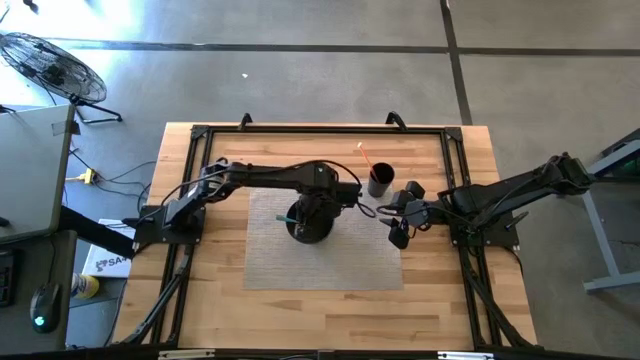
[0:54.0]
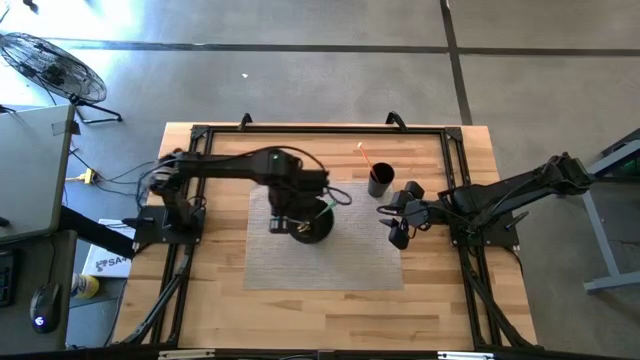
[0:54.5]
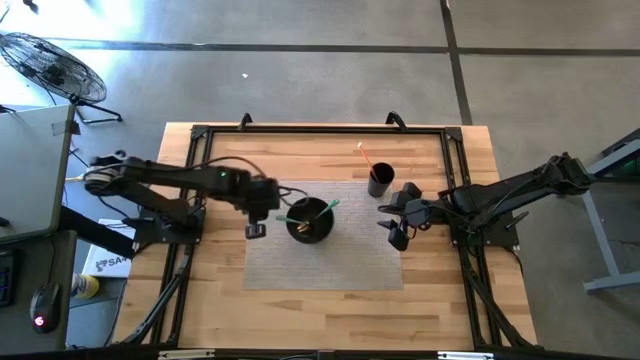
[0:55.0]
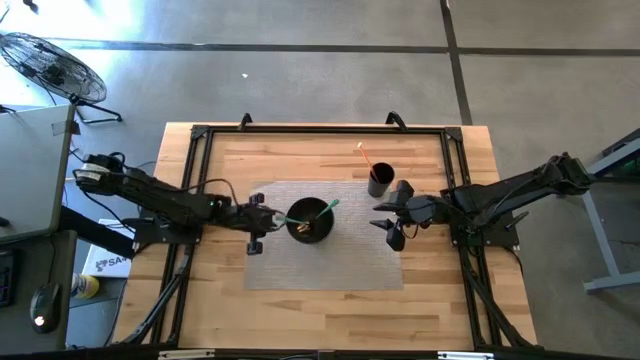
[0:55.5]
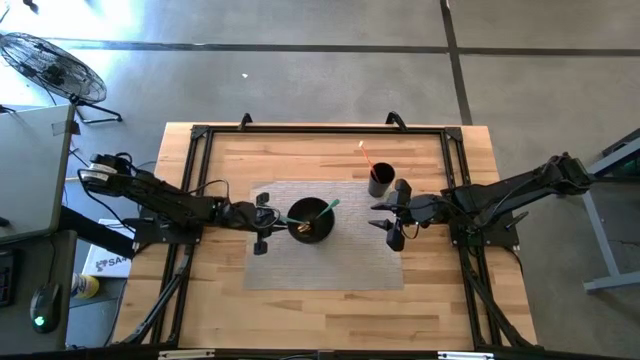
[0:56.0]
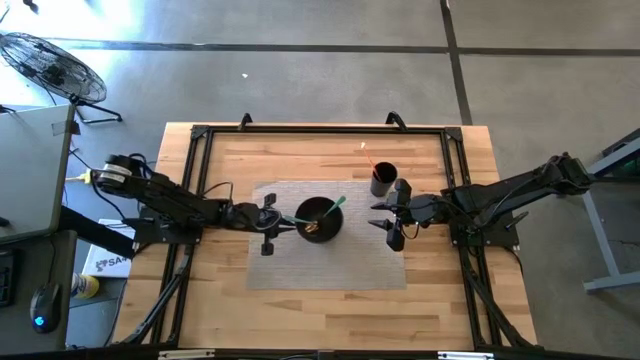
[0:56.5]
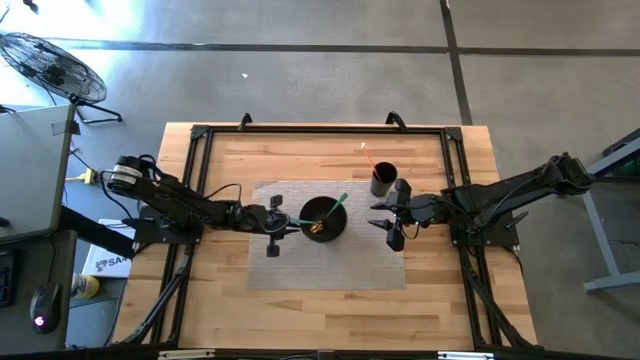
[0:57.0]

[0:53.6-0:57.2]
Task: Pick & Place Utensil
Adjust the black bowl on the gray mat

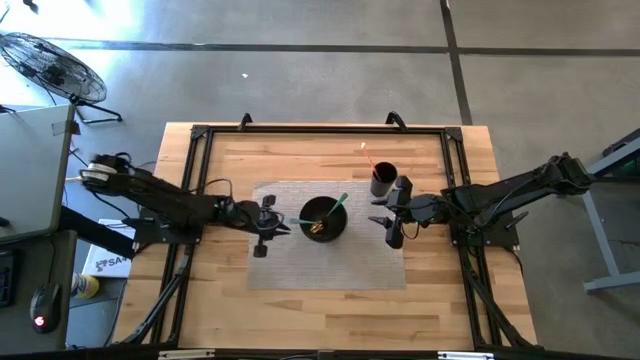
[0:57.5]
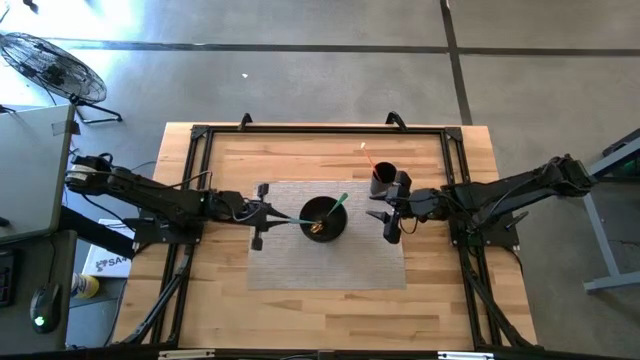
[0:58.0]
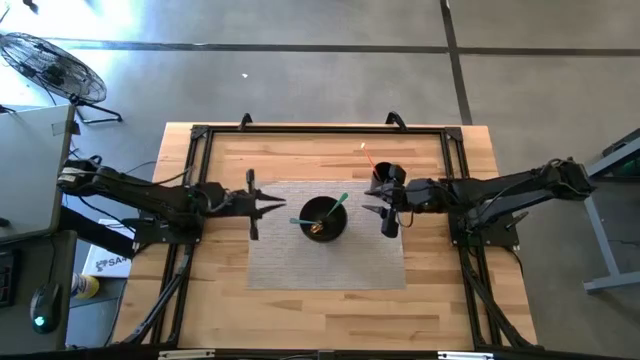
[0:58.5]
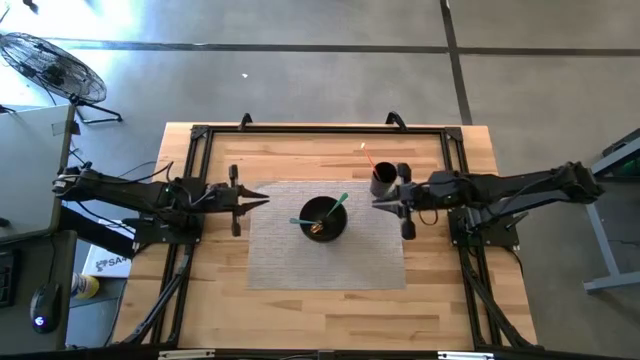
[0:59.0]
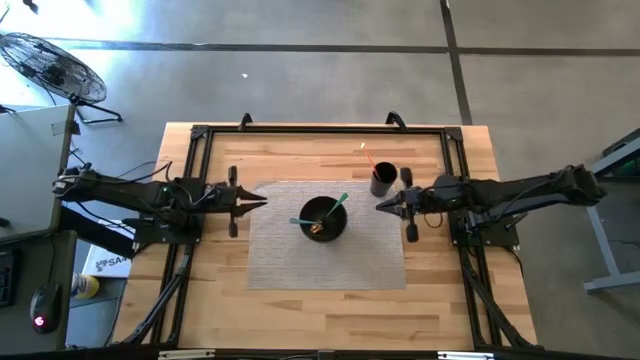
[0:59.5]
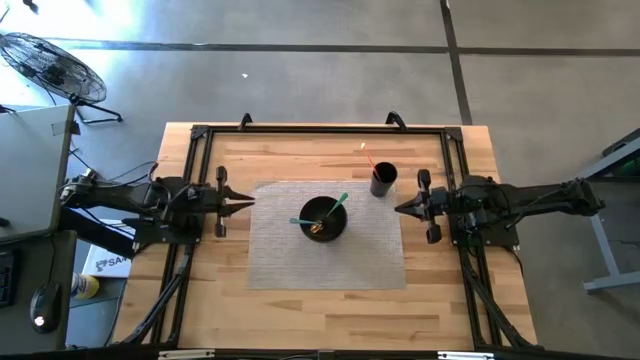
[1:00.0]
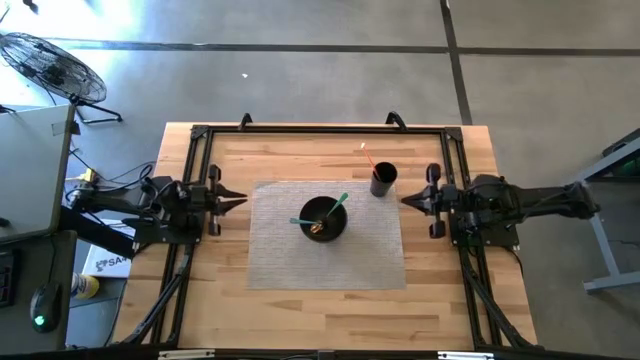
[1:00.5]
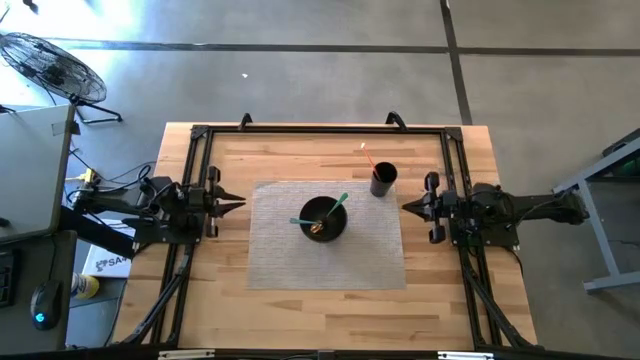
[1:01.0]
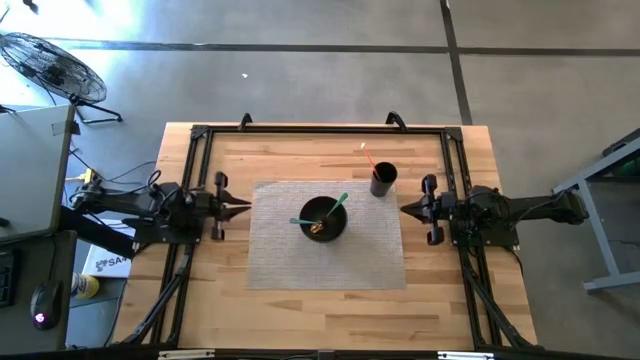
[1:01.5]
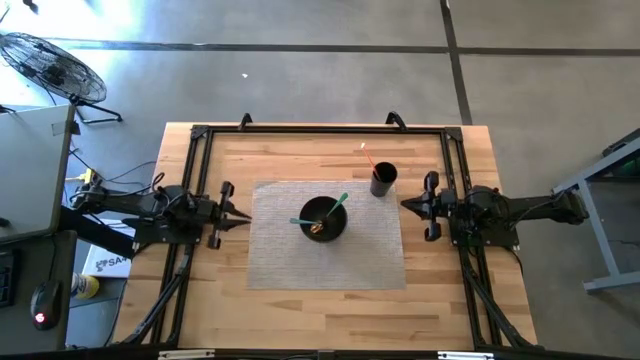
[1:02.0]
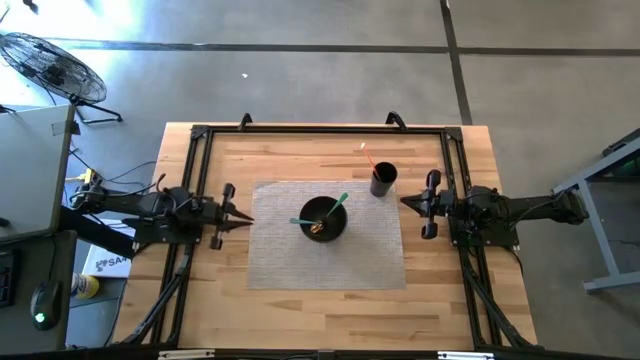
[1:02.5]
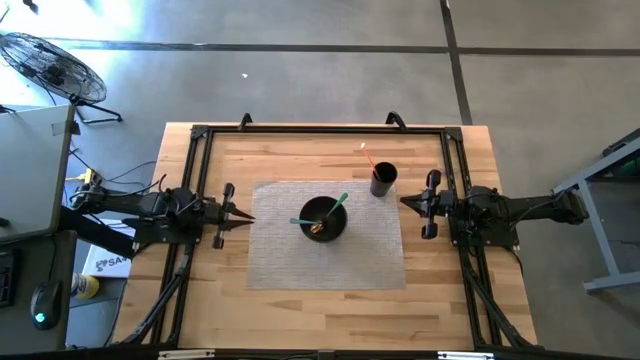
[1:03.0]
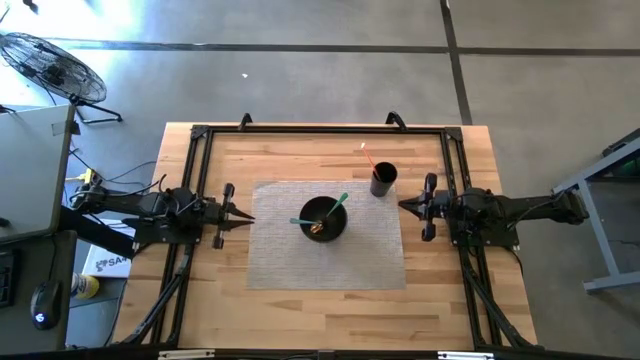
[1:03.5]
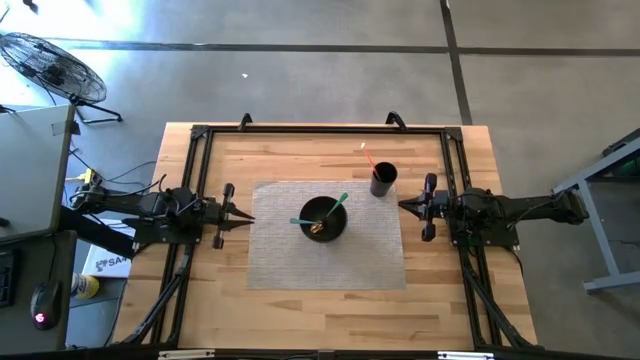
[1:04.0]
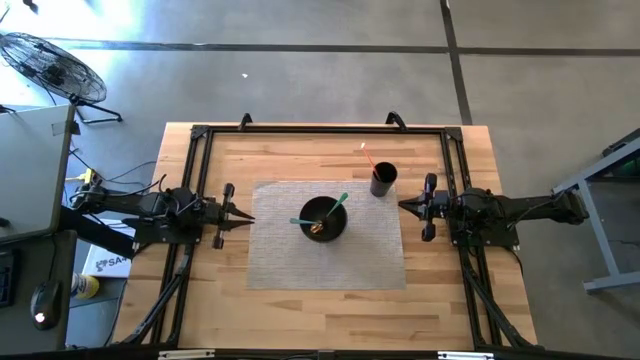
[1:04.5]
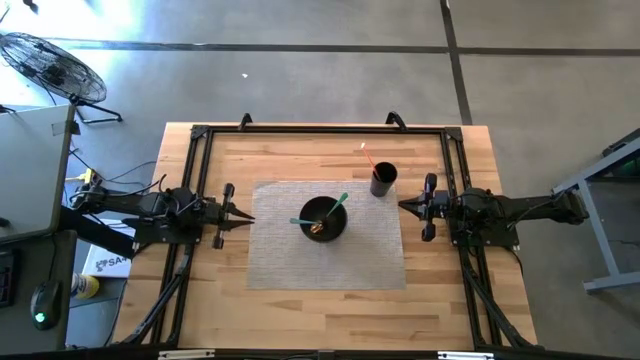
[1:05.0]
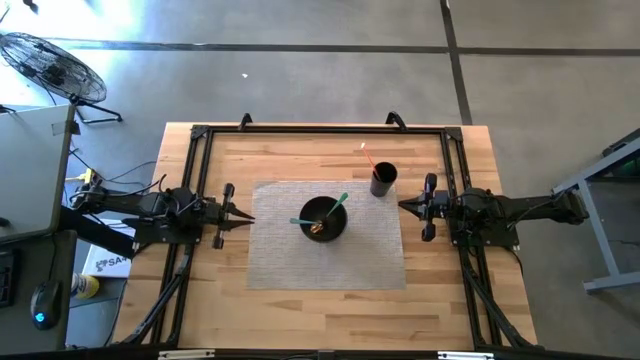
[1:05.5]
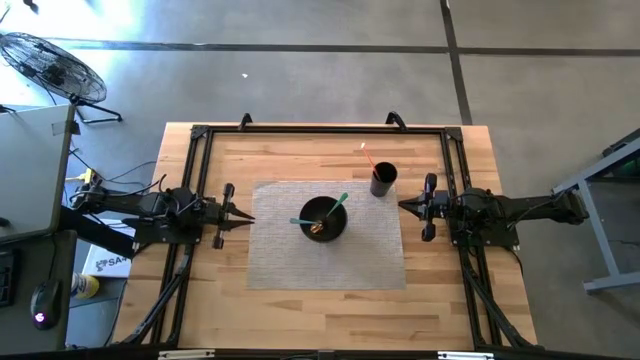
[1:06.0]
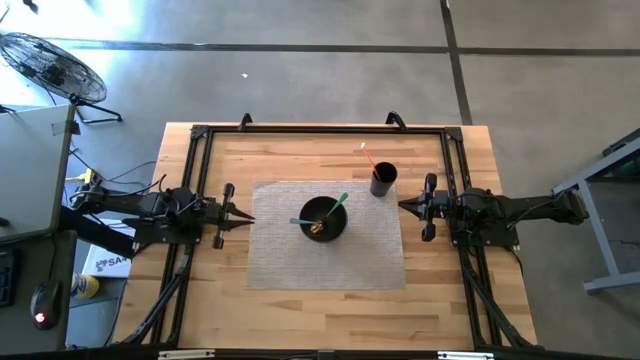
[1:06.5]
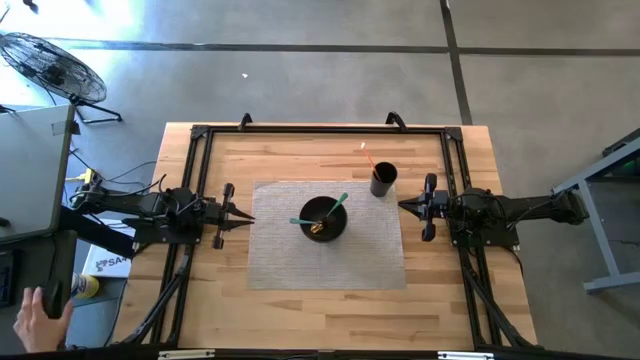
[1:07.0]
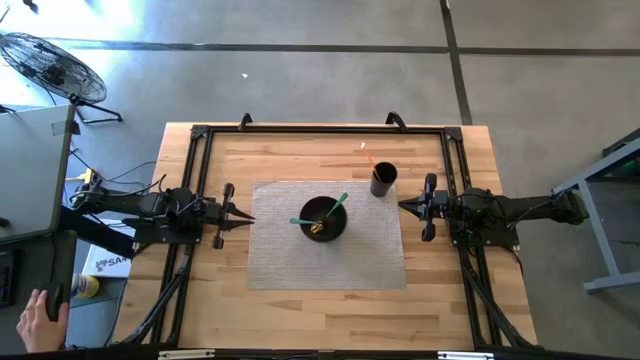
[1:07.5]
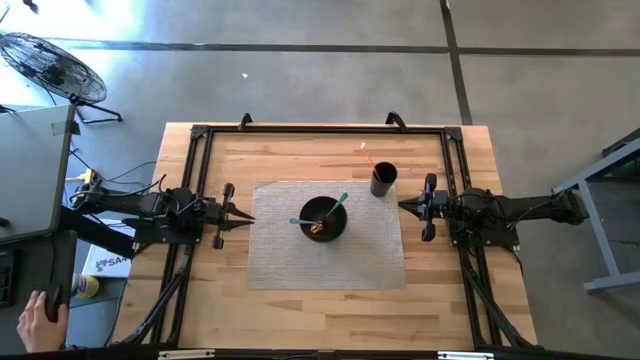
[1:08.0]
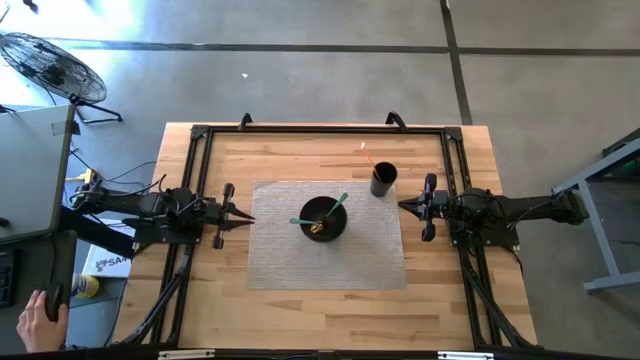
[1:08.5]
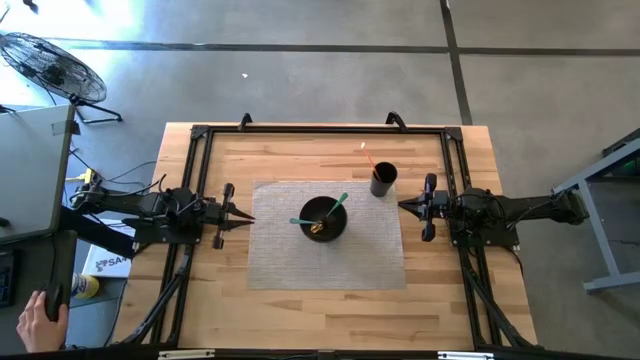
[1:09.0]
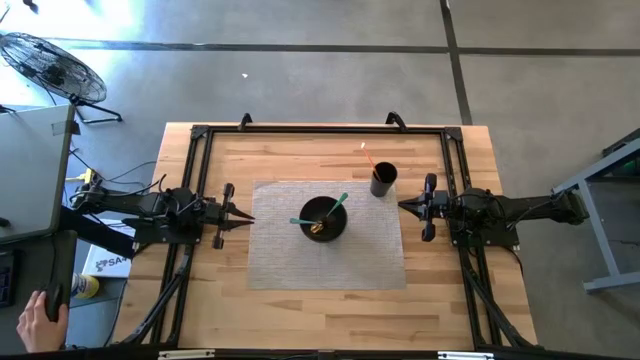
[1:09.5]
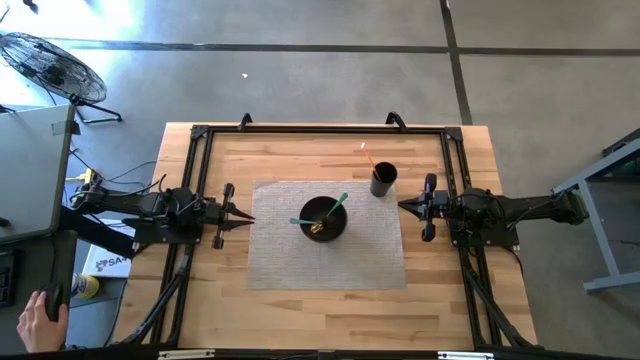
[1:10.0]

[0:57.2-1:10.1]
Return to Home Position

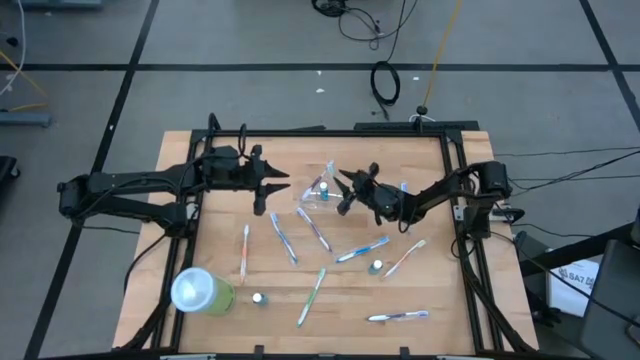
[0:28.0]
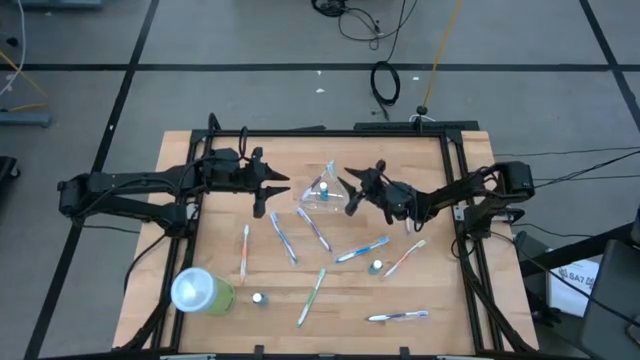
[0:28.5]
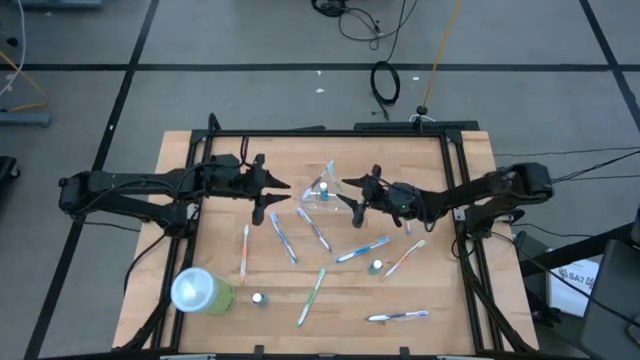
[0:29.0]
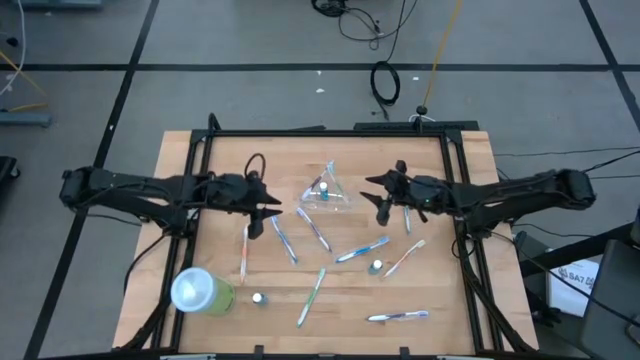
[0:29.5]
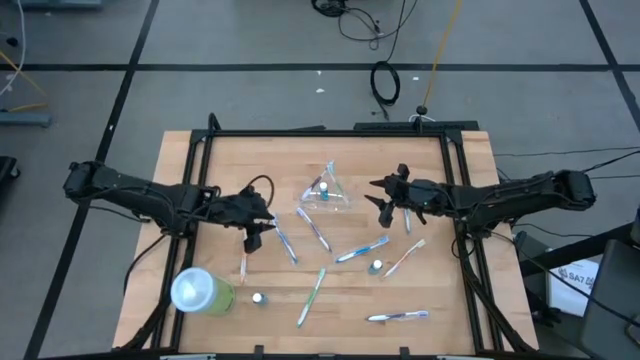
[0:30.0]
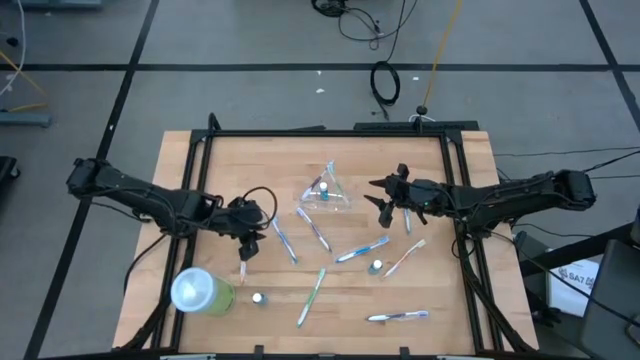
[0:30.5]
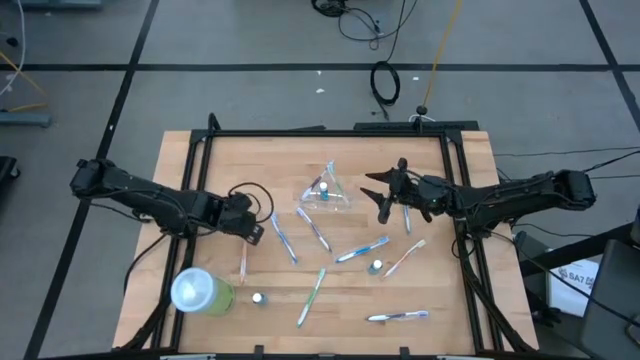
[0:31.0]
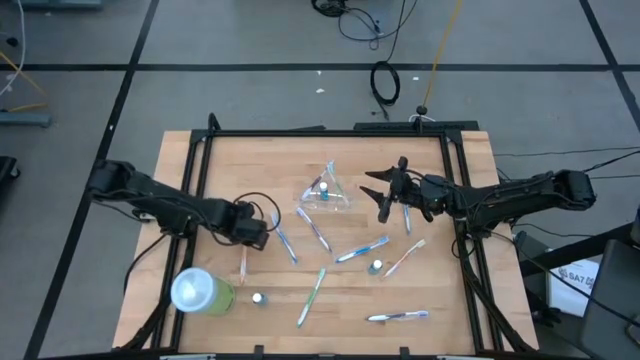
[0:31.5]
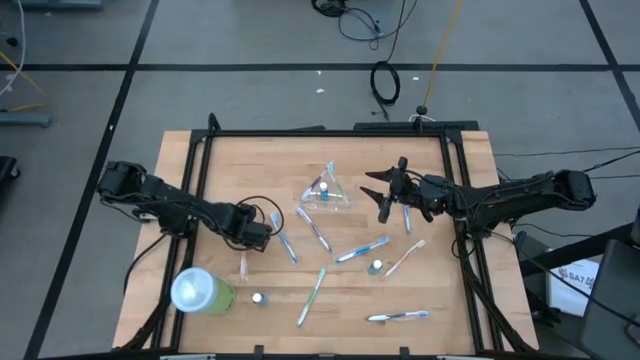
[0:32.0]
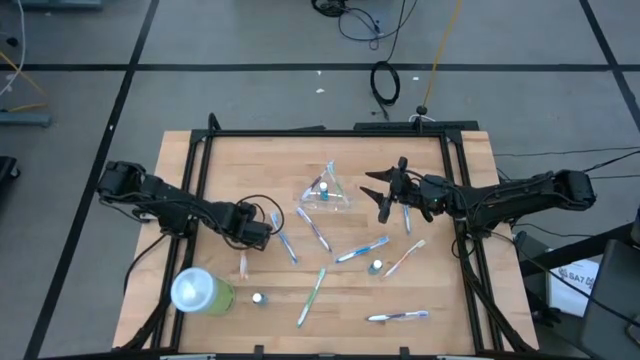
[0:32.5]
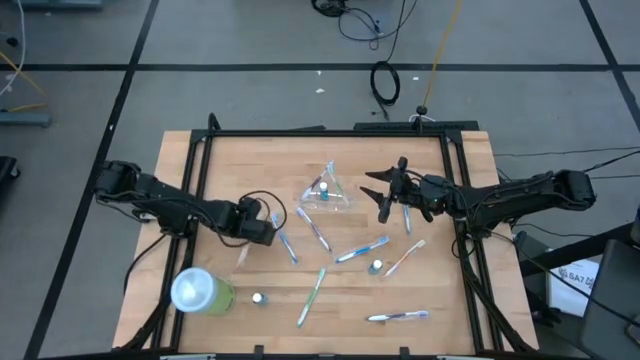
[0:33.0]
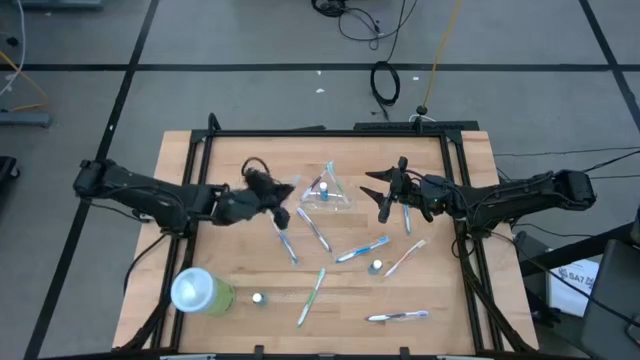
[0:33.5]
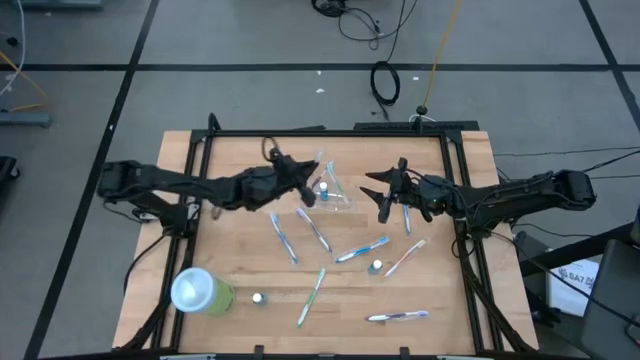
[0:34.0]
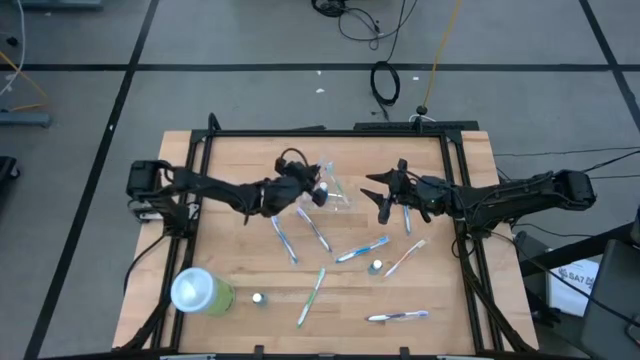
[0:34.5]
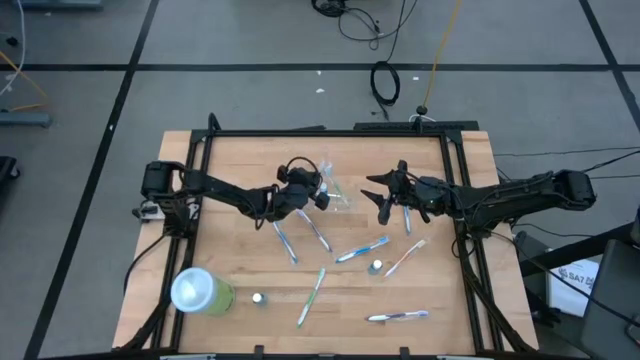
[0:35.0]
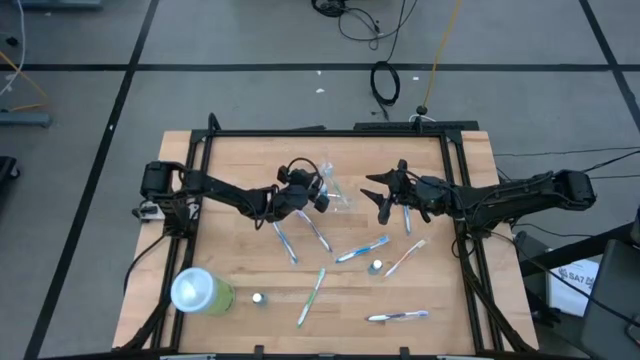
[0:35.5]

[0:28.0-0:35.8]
Task: Pick & Place toothbrushing station
Put the left orange toothbrush into the transparent organizer
